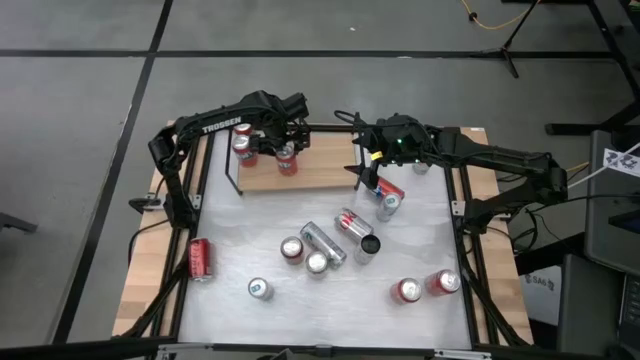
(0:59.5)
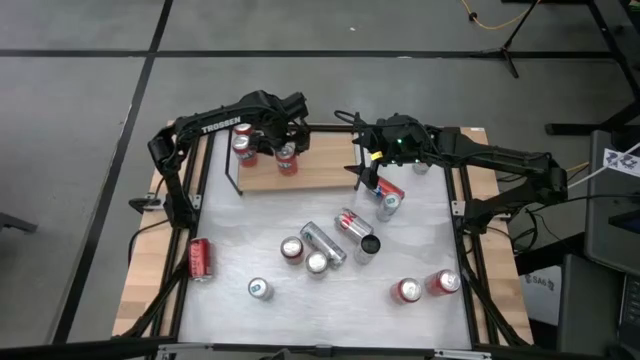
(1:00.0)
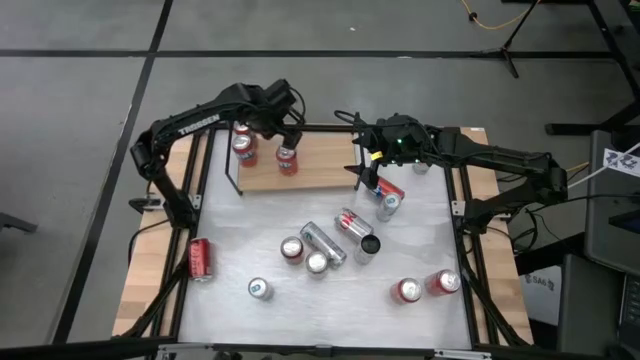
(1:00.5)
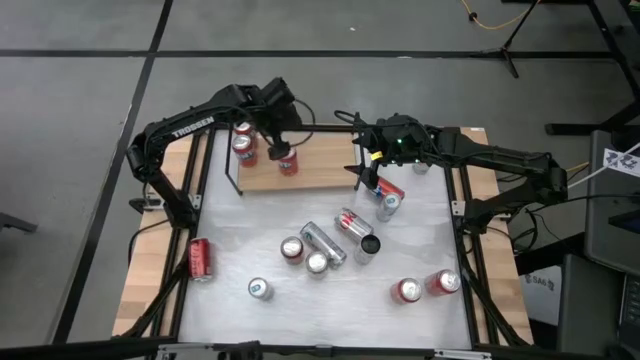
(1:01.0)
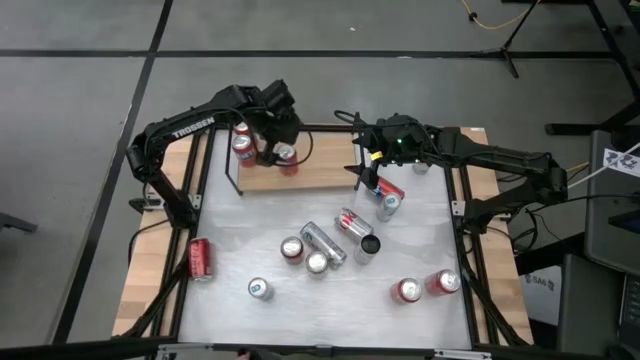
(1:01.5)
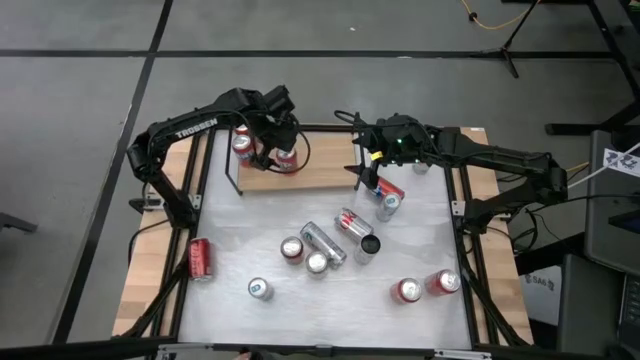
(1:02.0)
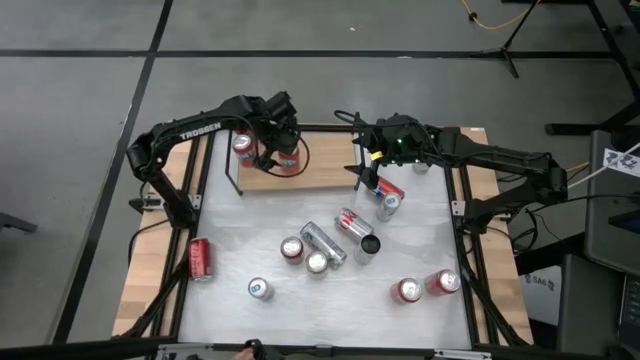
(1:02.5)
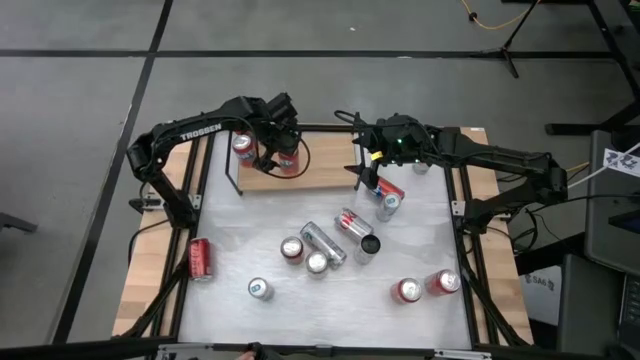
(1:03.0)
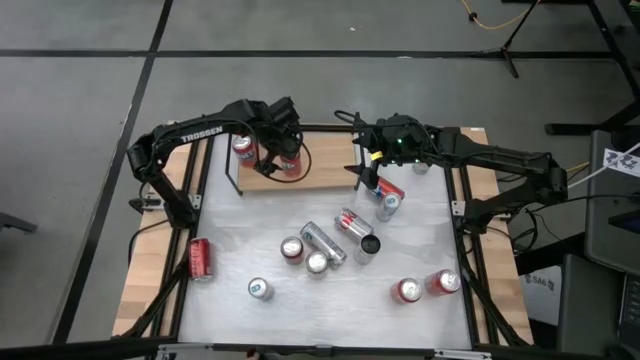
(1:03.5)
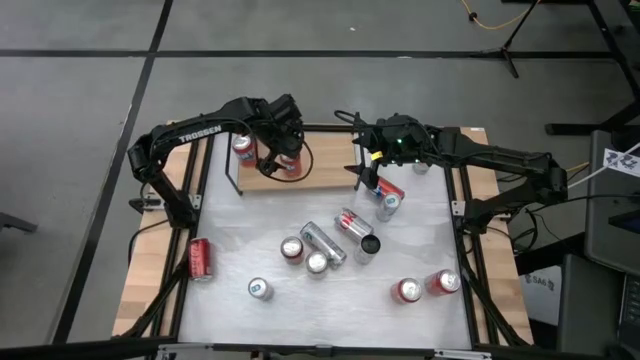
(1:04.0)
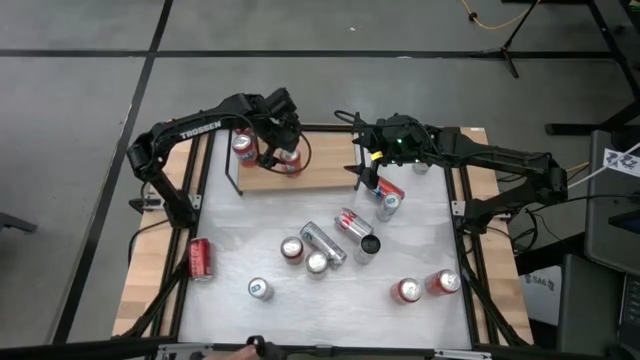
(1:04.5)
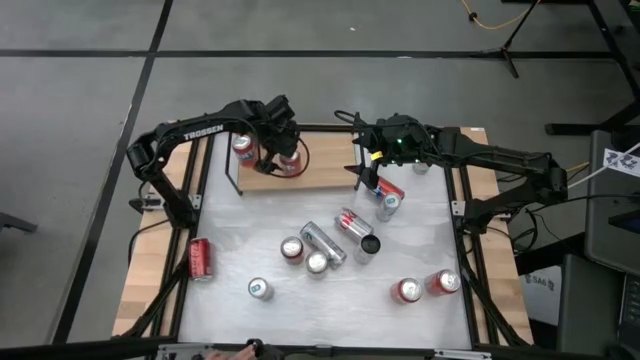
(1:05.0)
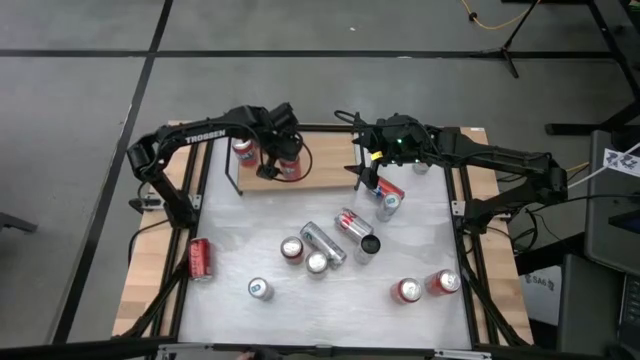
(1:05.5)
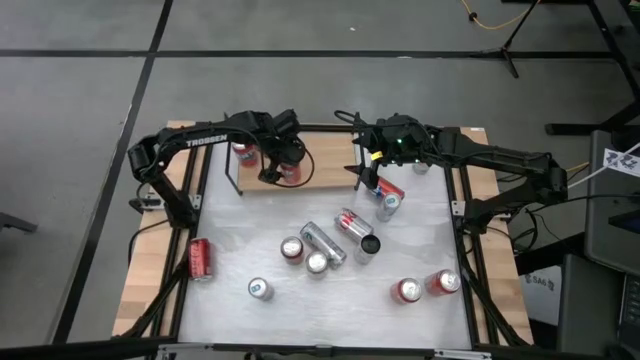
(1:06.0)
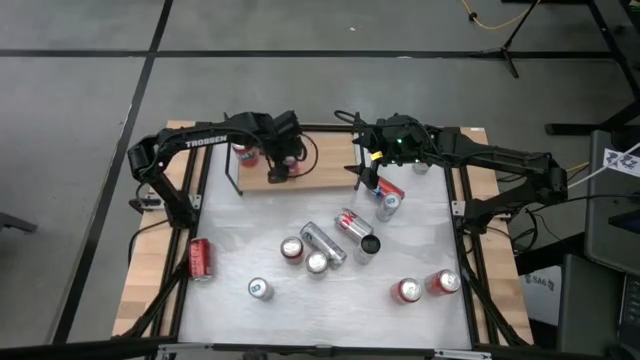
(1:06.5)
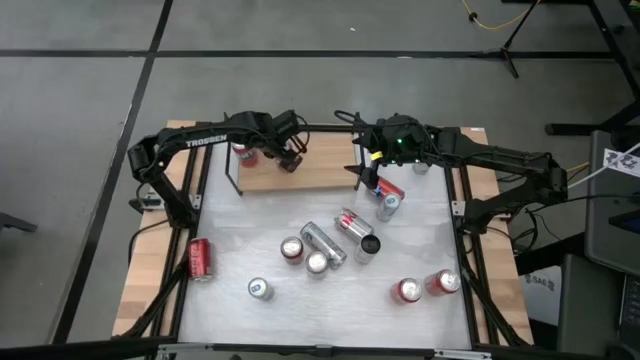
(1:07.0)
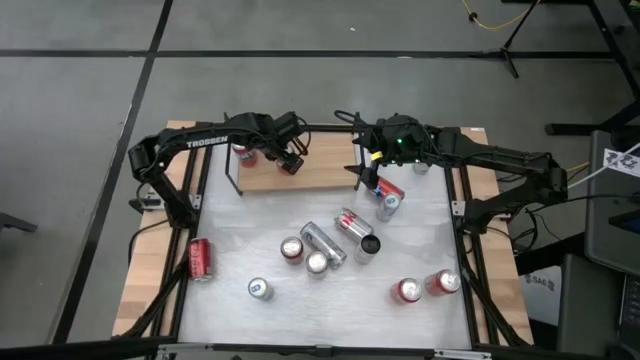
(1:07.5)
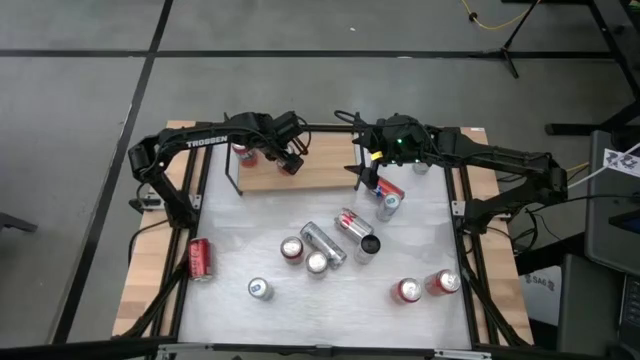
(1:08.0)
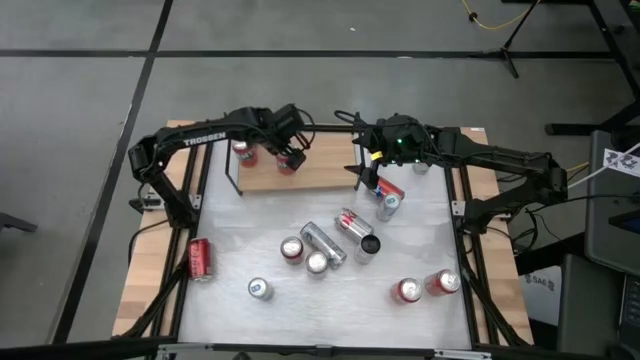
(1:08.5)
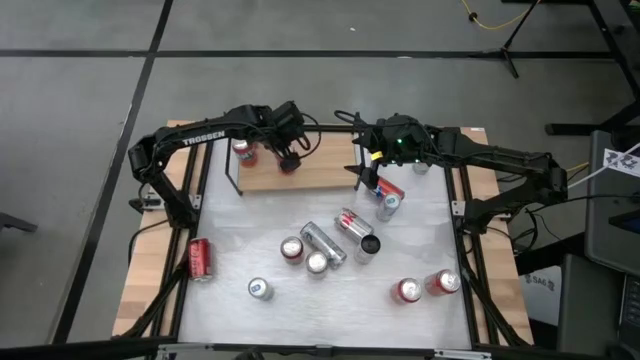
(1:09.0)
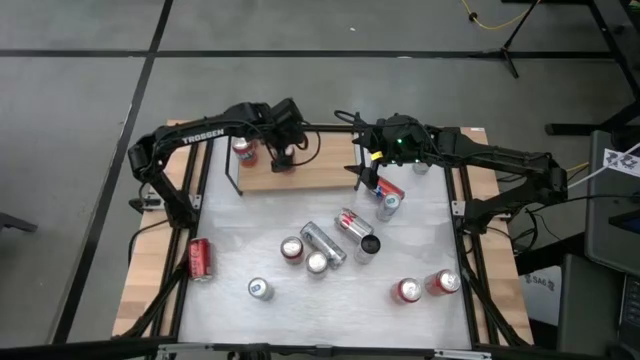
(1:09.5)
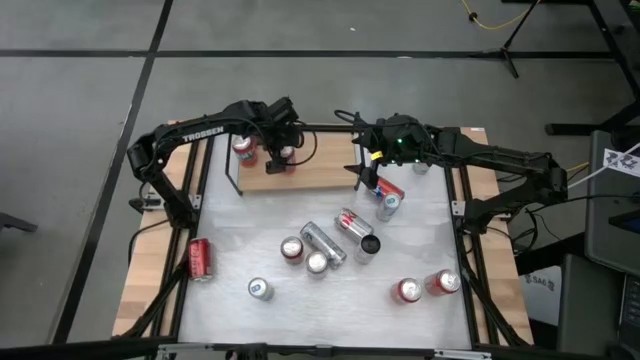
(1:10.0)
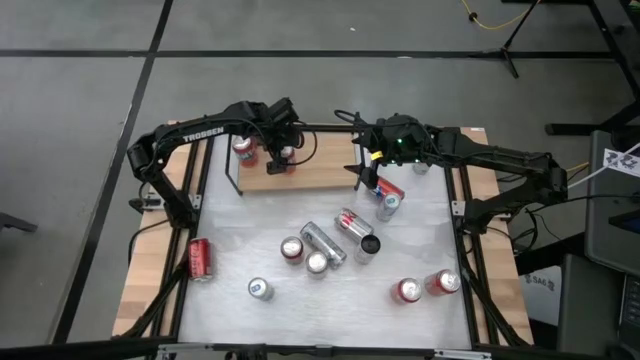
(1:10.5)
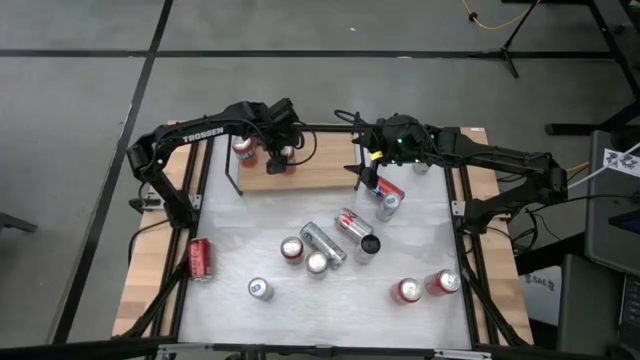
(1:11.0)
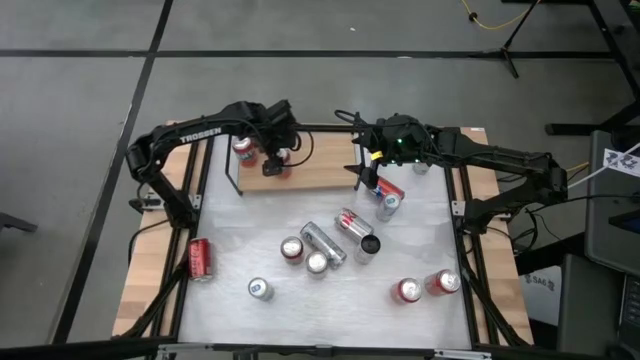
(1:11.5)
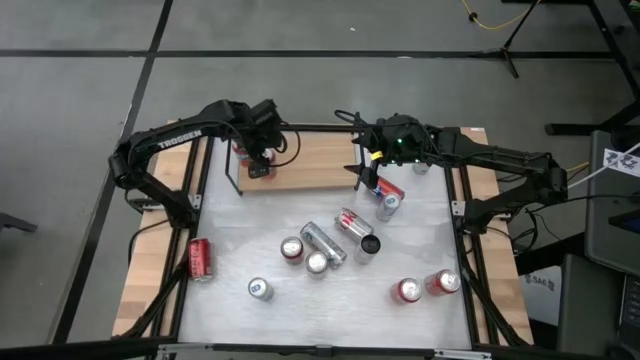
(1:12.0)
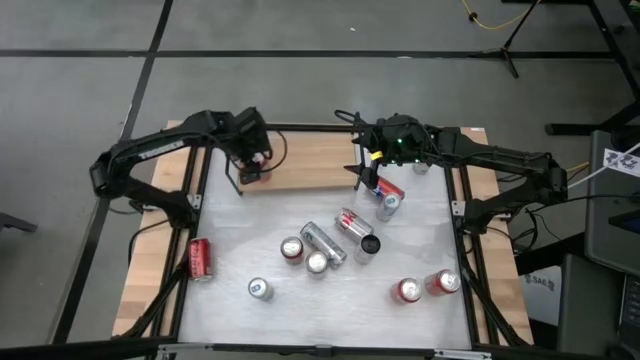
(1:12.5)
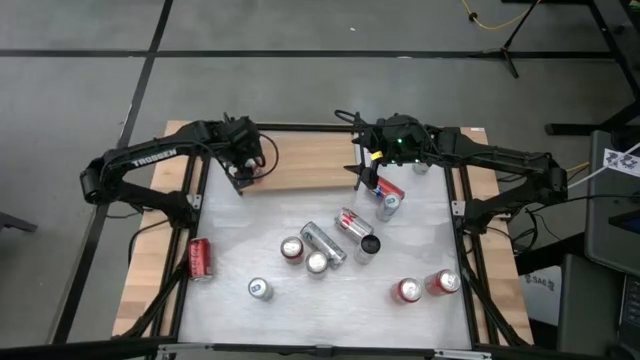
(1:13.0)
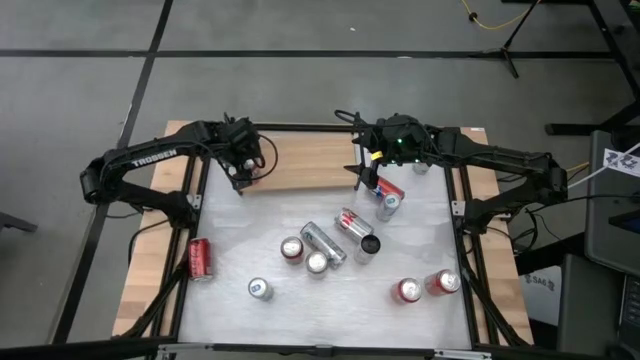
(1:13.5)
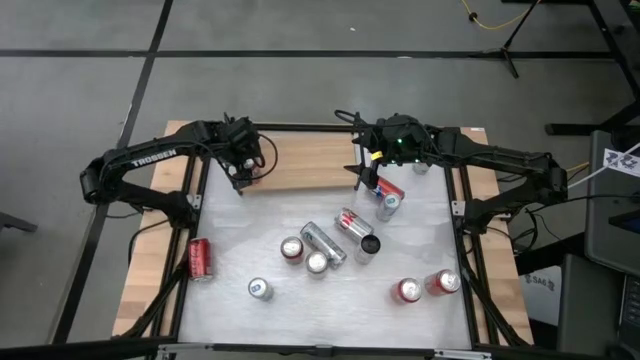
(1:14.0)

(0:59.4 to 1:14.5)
Task: Place canned beverage on shelf
Put the red soda can on the shelf aligned with the other red soda cans

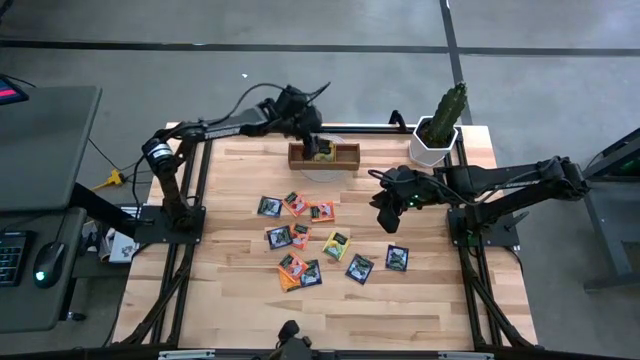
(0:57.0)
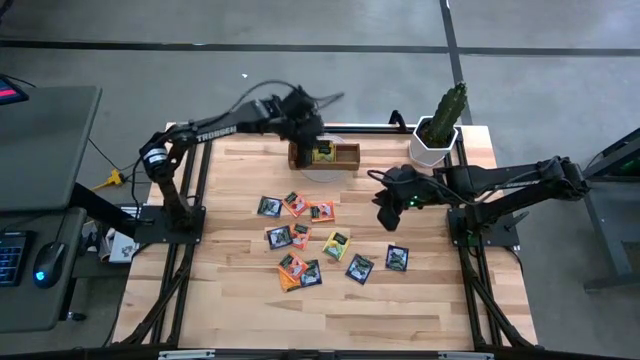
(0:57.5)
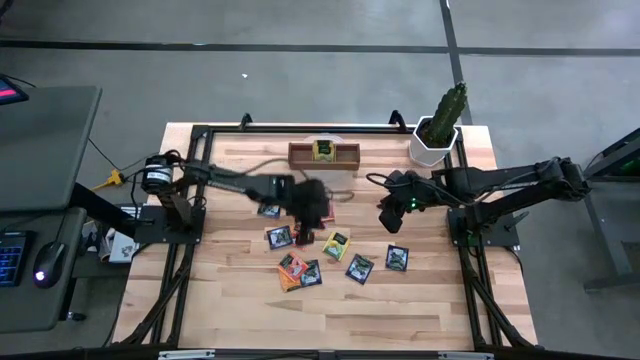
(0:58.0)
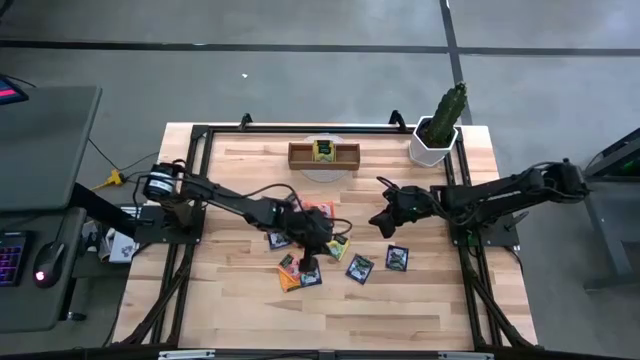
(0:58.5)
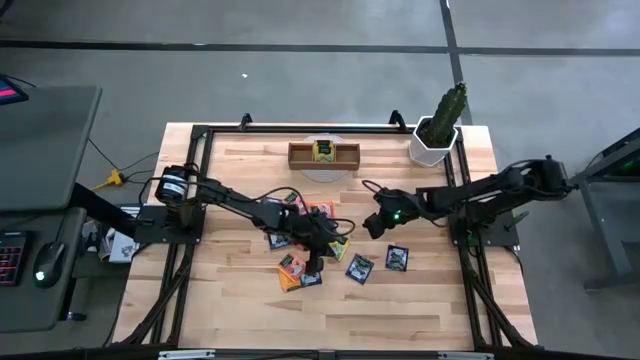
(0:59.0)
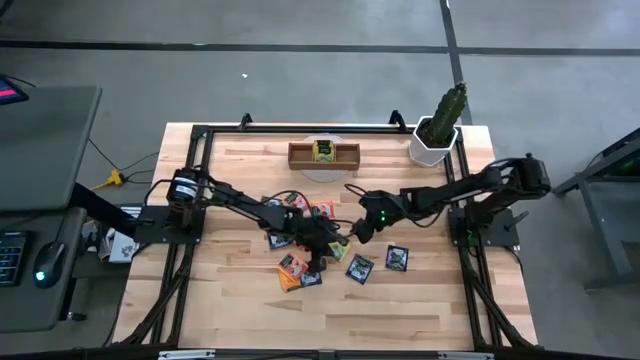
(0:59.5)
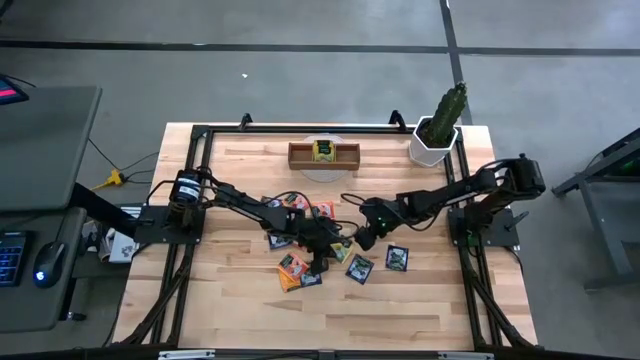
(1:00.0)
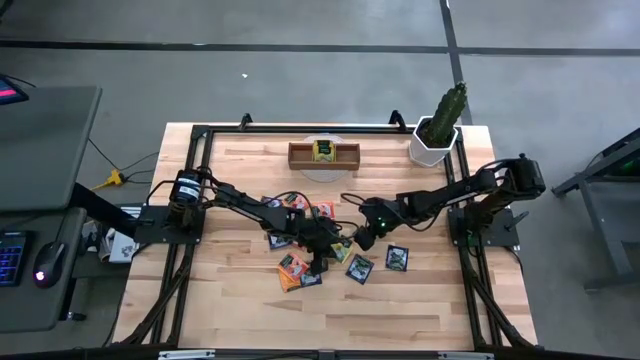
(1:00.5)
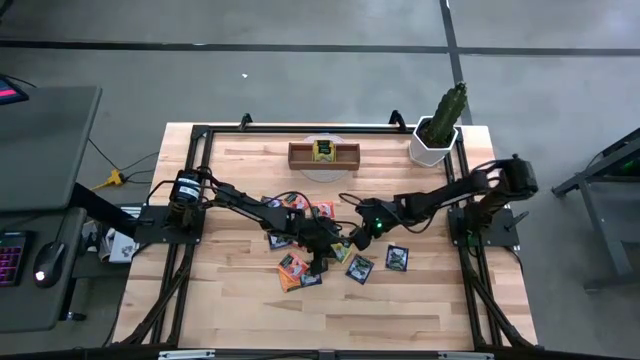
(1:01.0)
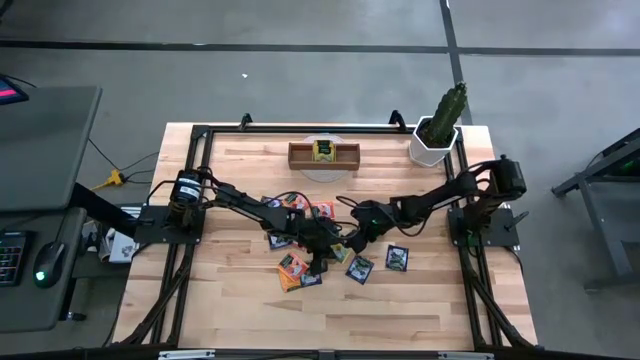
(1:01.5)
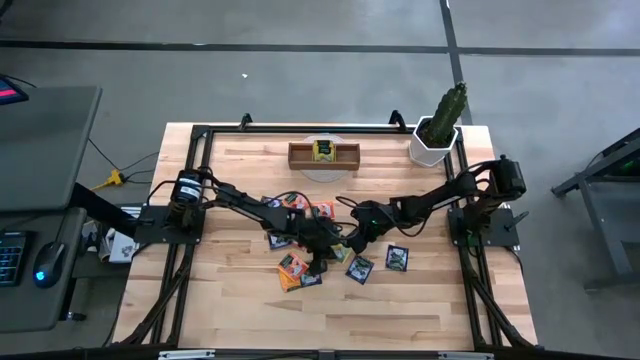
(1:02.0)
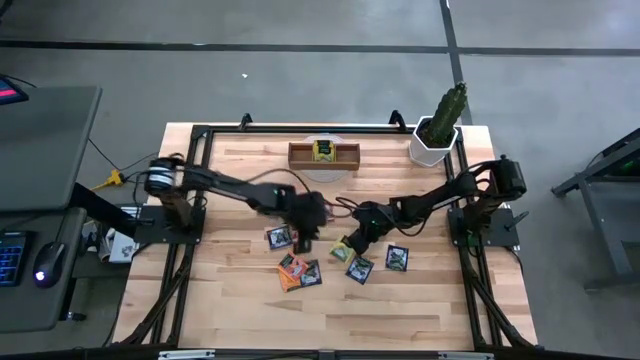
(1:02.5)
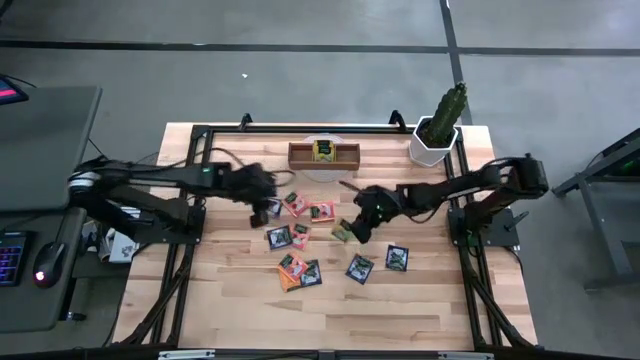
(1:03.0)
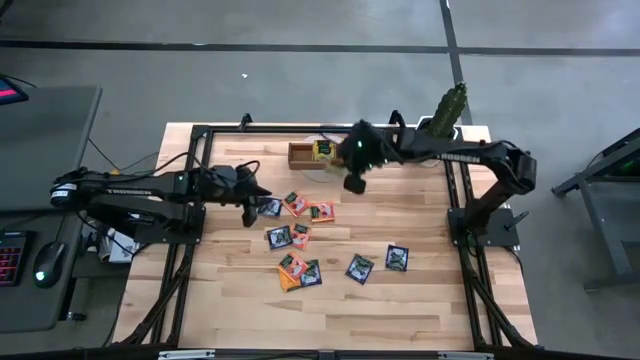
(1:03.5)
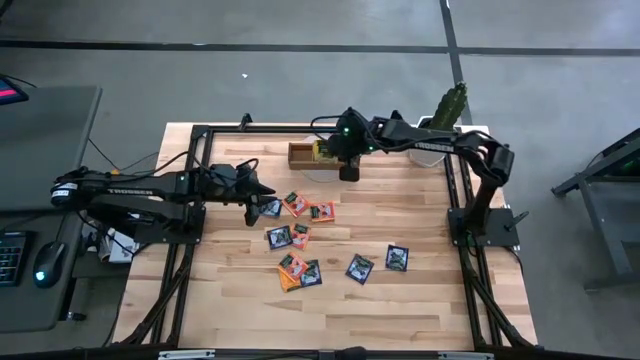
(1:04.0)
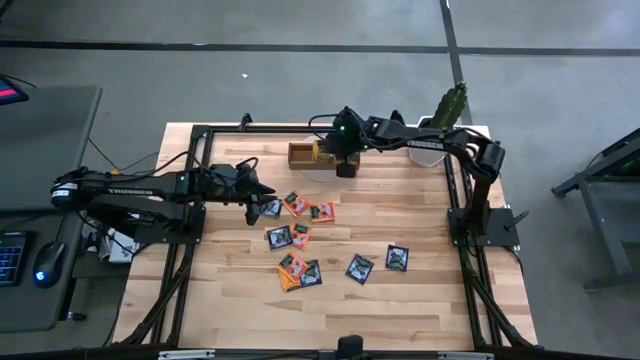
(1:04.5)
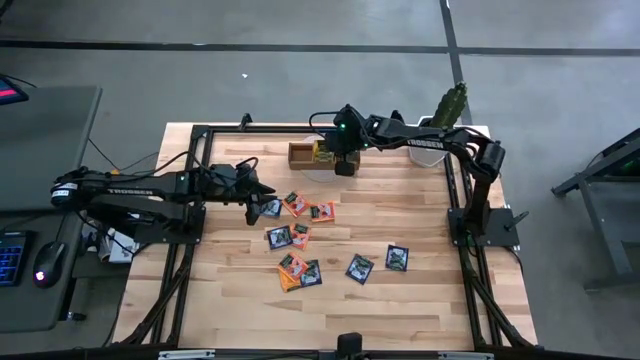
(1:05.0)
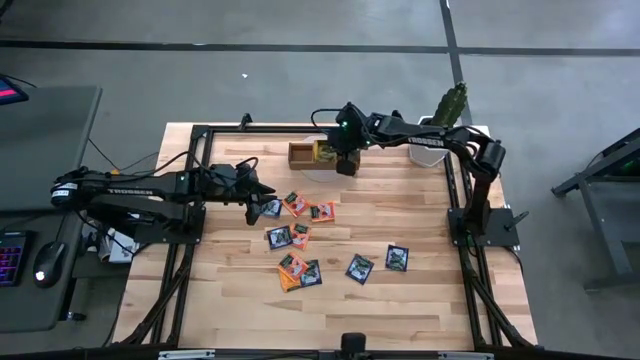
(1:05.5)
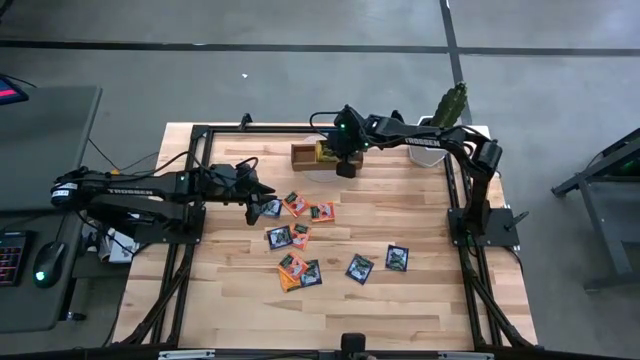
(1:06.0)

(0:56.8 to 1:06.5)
Task: Pick & Place Tea
Put the yellow tea bag in the middle compartment of the organizer
